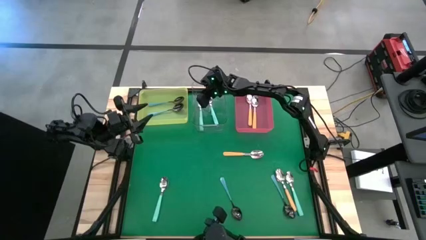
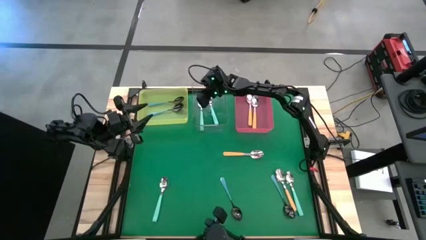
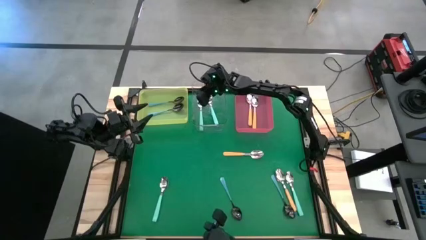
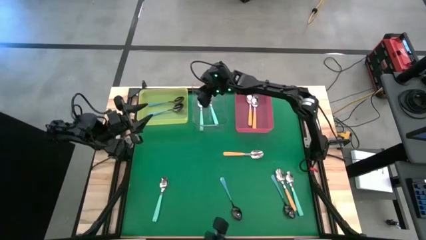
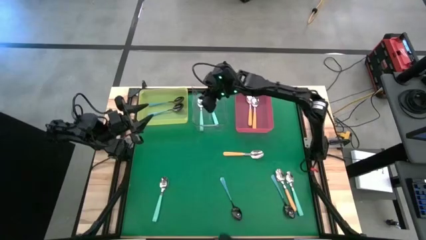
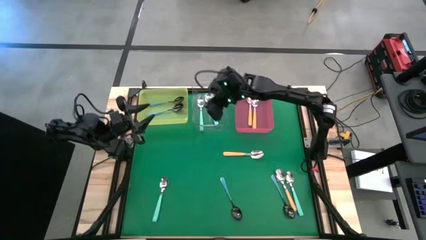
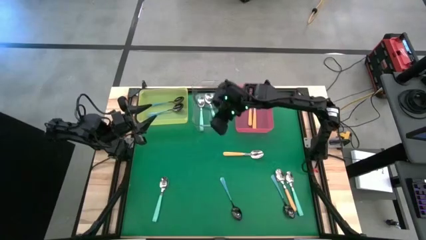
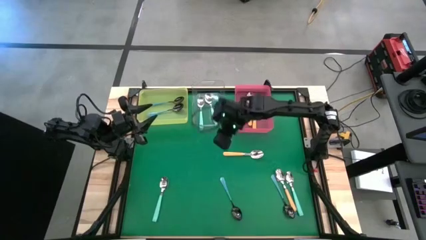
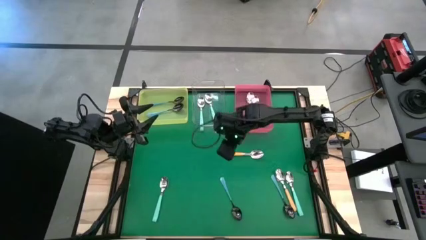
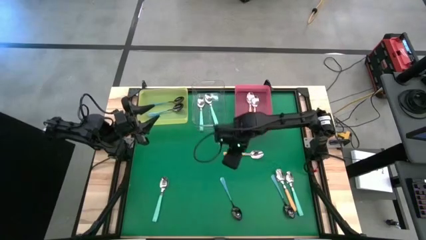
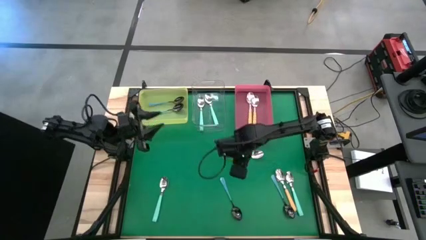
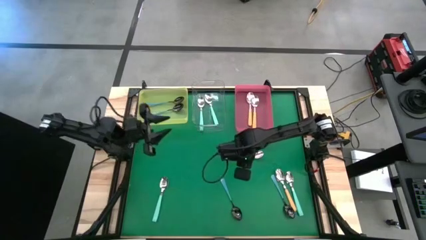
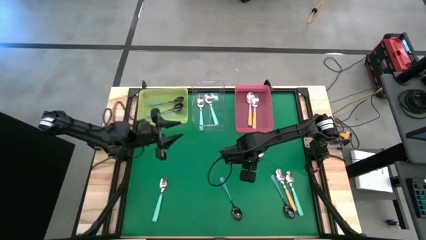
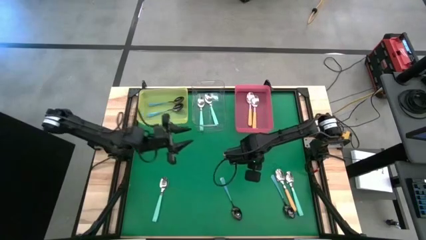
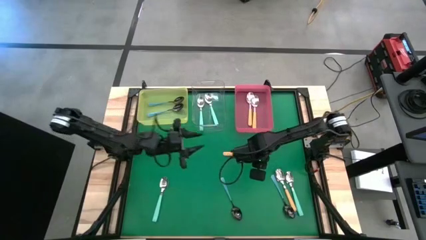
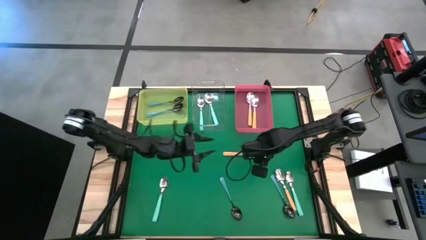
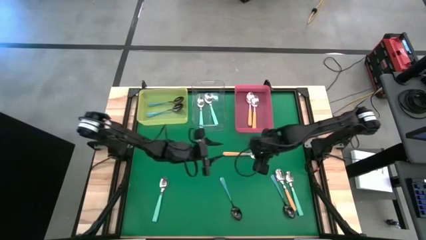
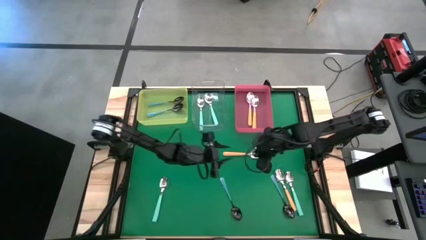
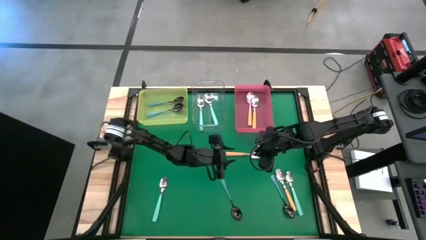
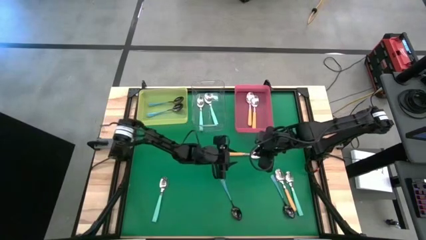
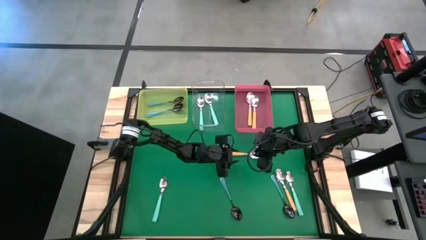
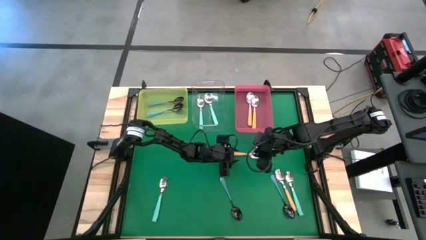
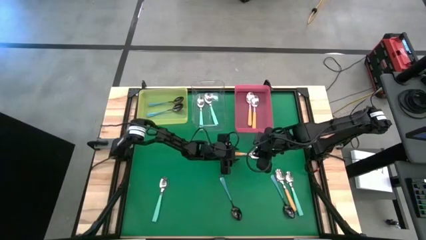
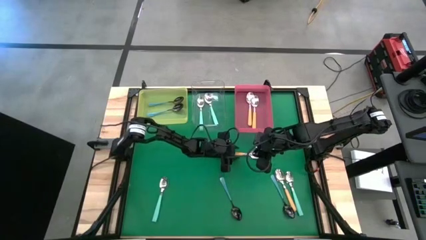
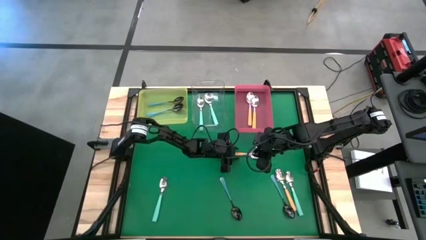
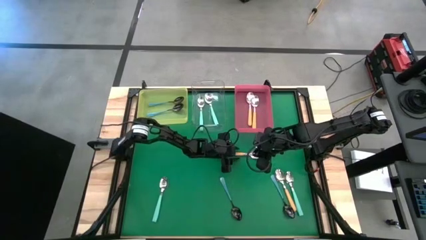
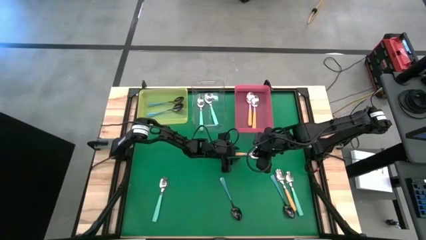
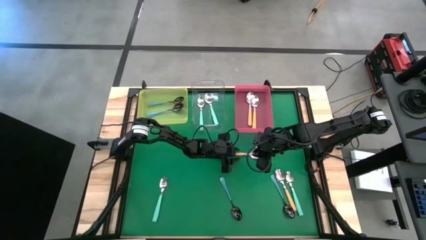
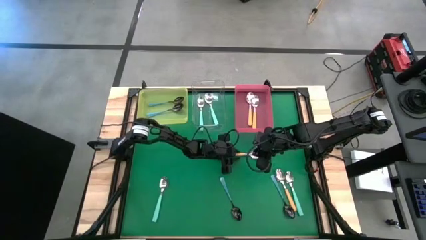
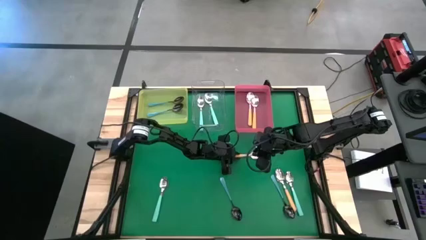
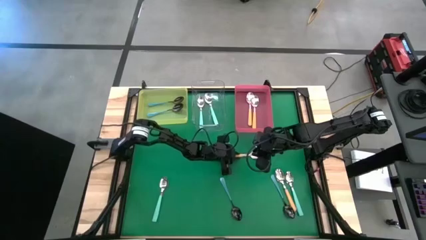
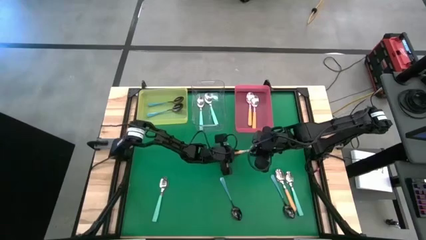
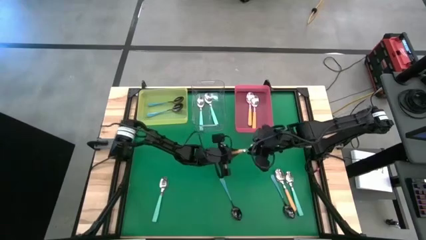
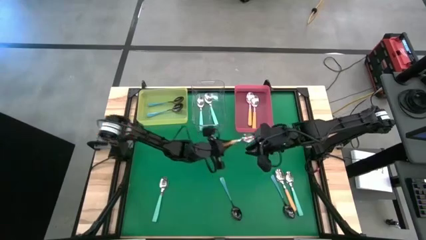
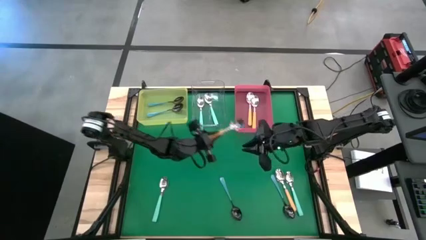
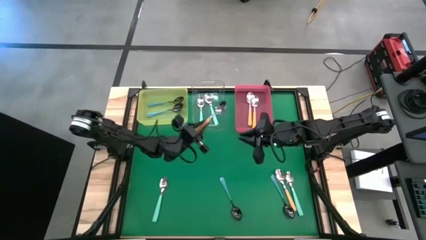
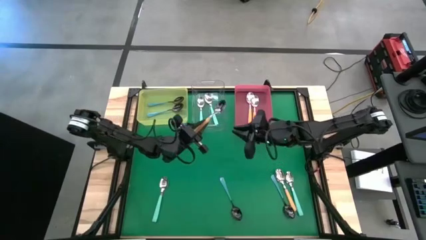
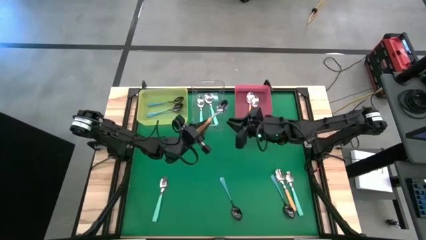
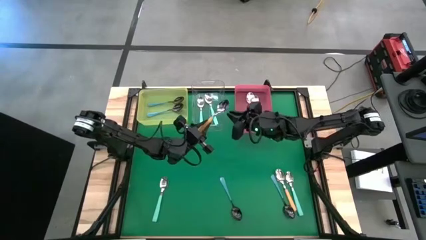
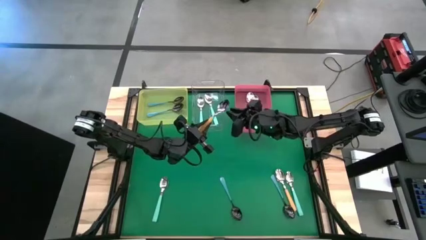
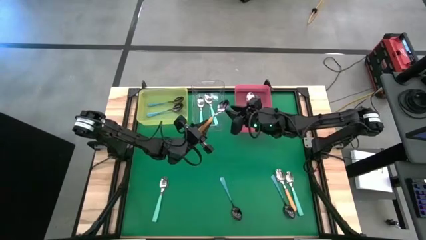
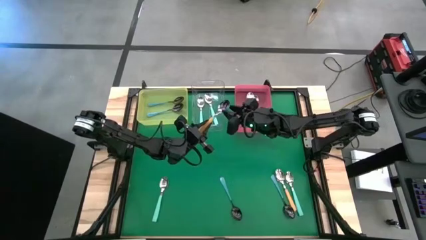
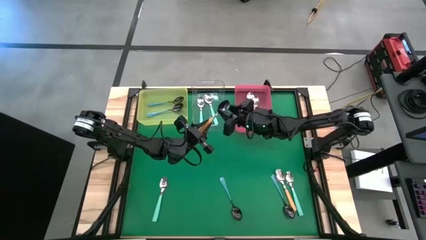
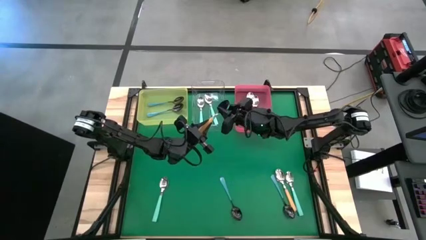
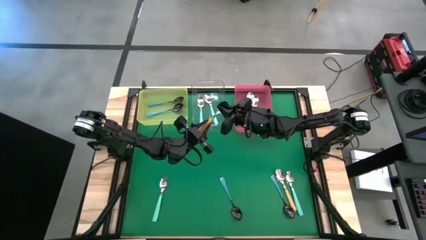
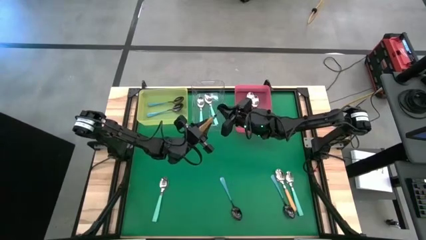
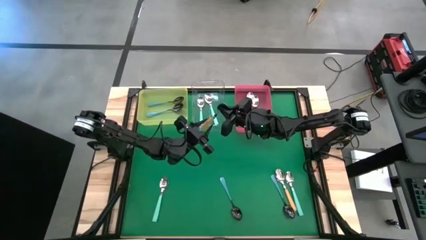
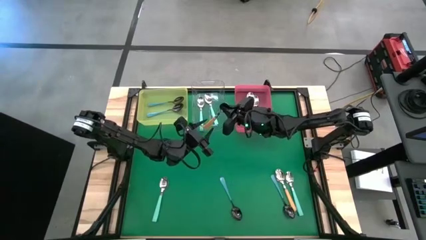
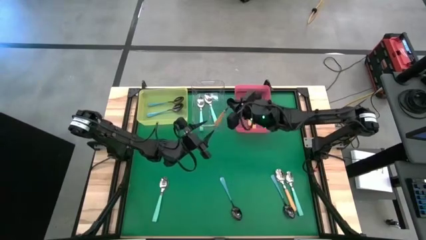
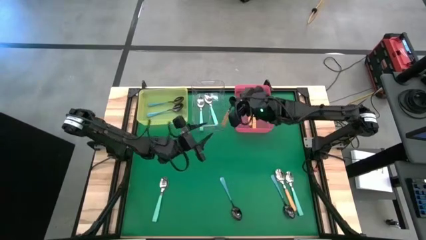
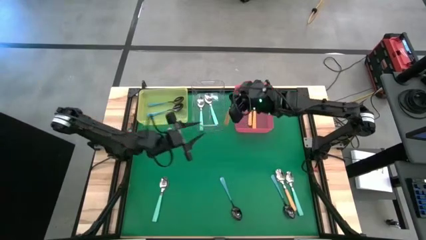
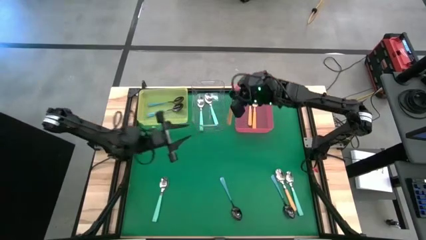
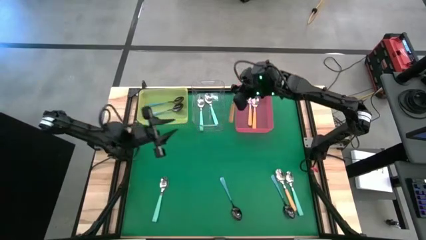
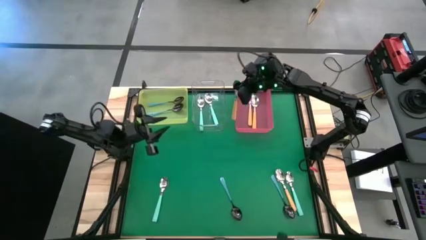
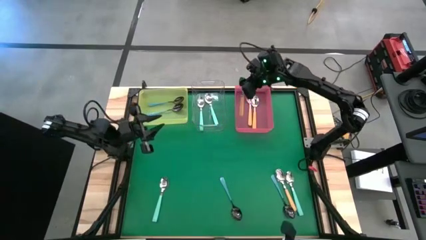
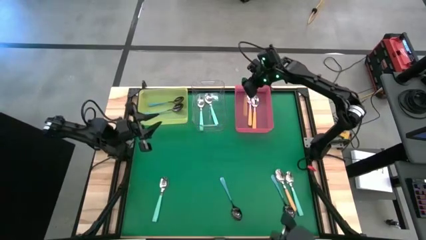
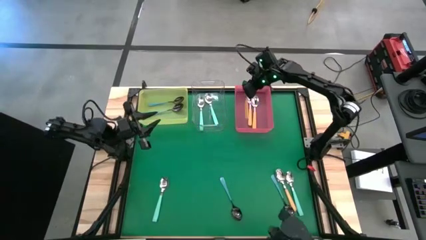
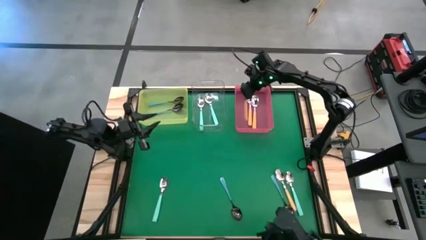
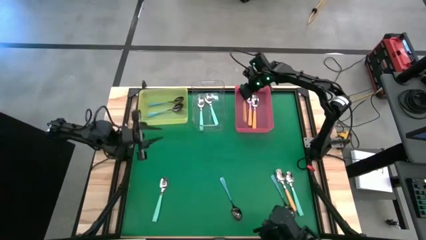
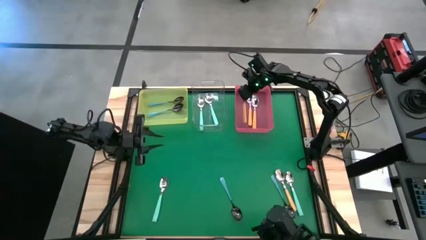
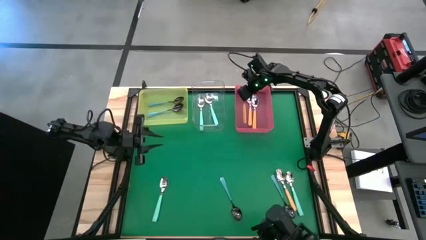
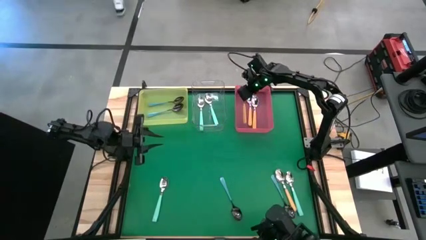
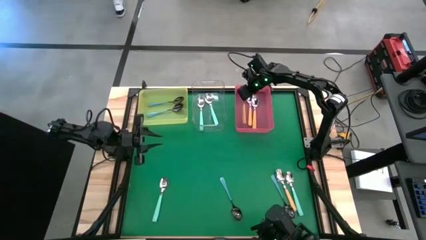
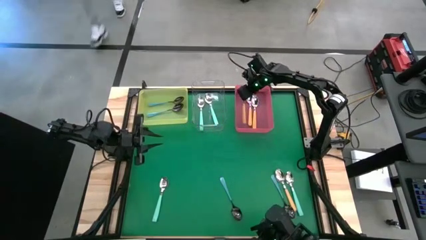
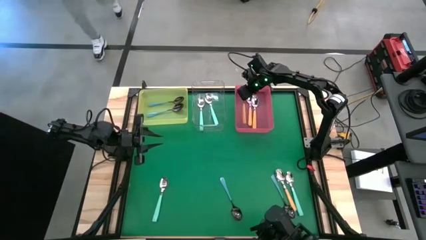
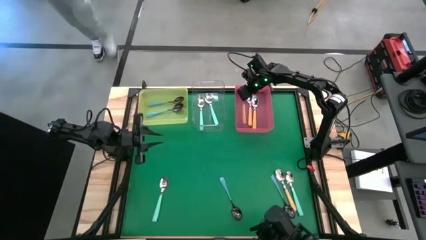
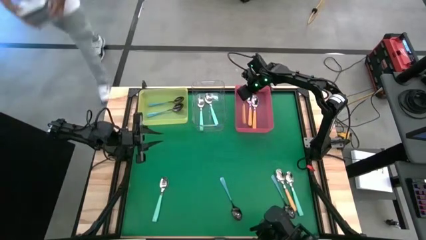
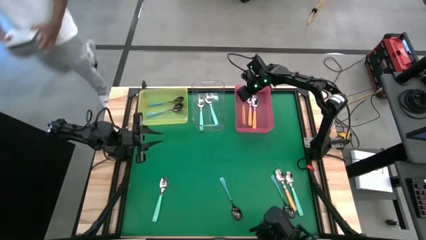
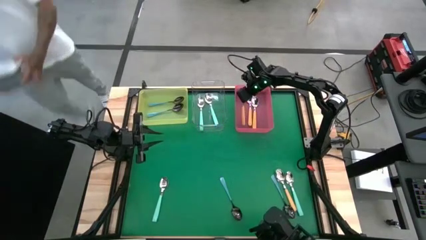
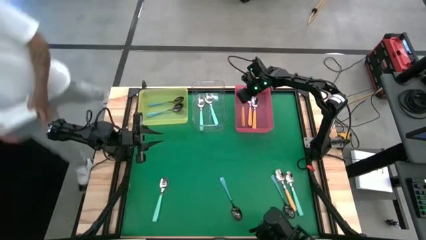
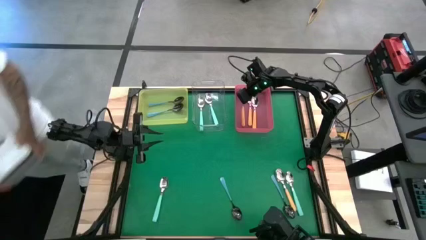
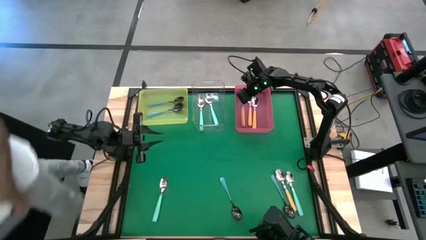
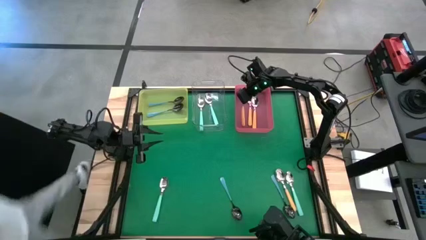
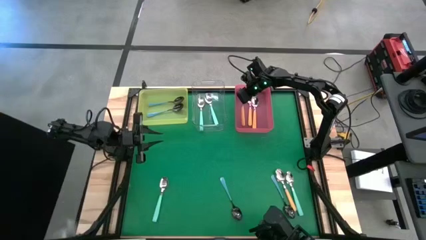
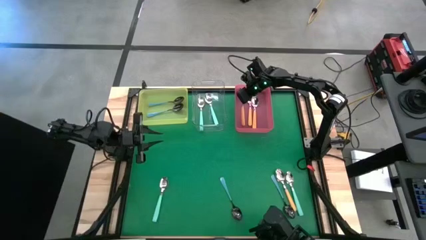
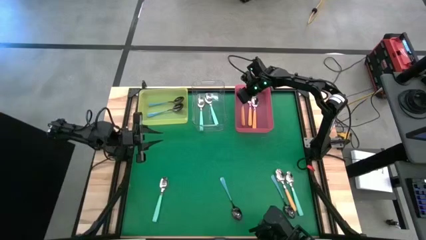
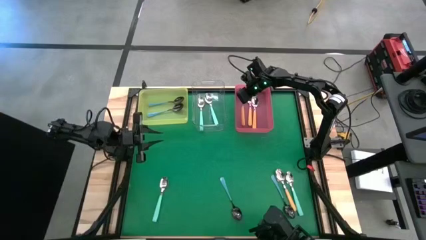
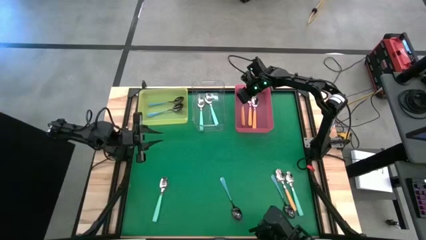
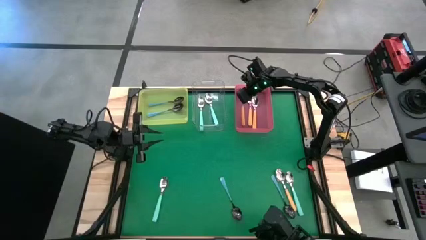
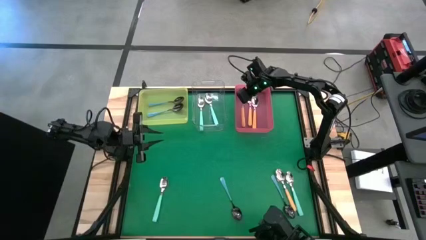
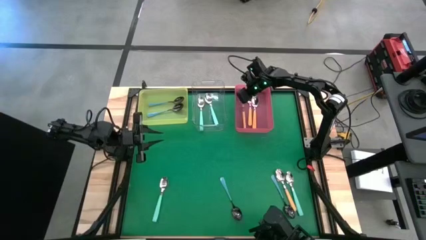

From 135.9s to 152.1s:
Task: Sort silverware by color (type)
Put the yellow spoon into the red bin
